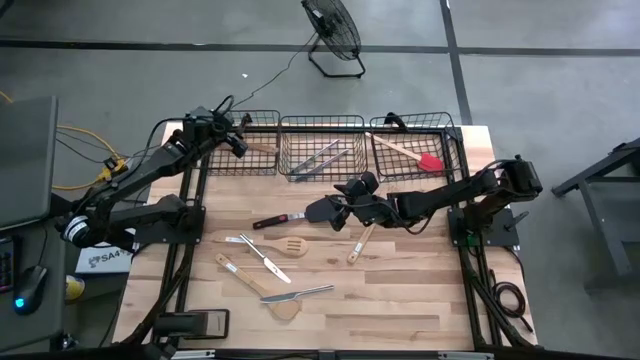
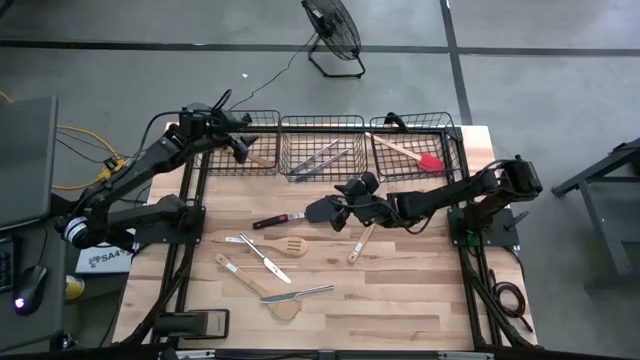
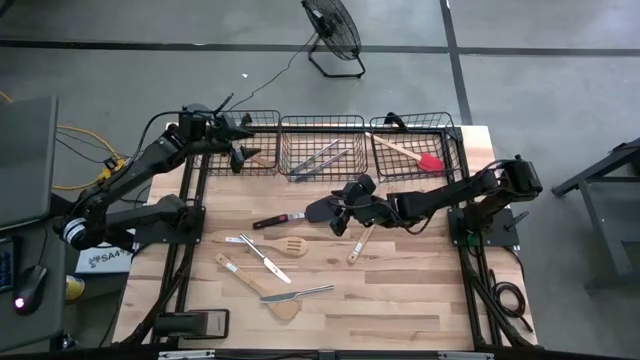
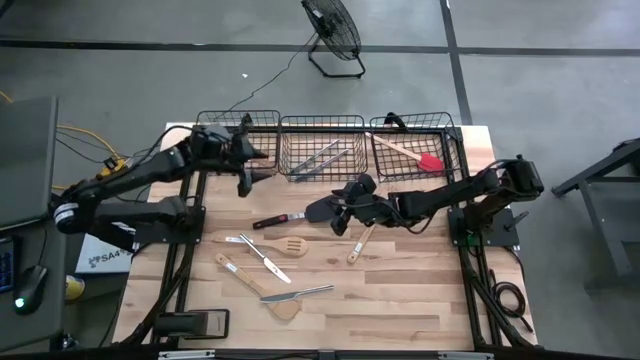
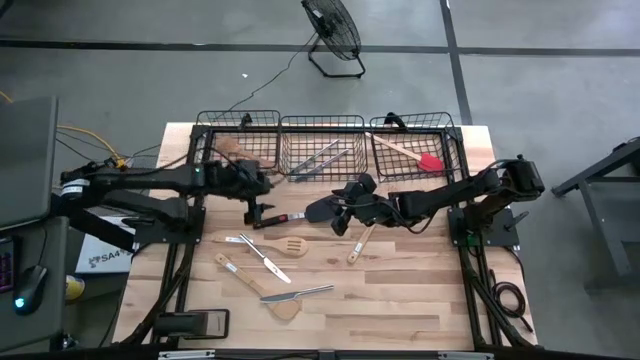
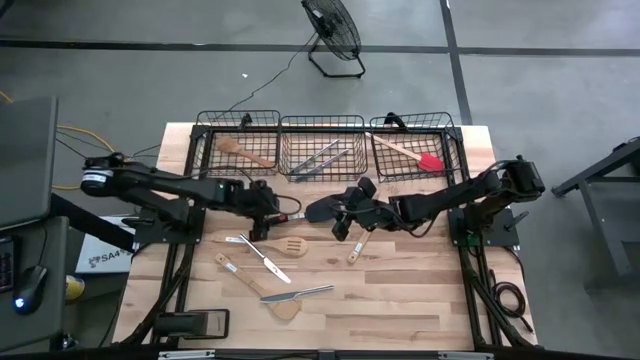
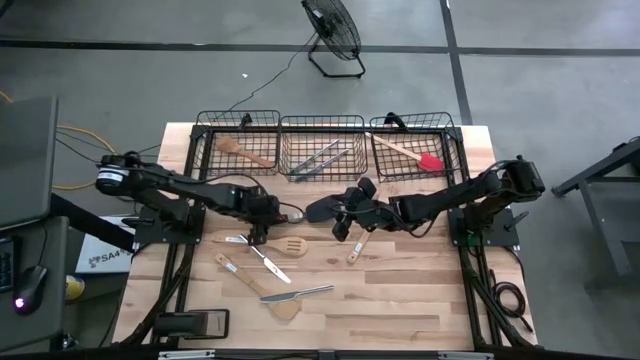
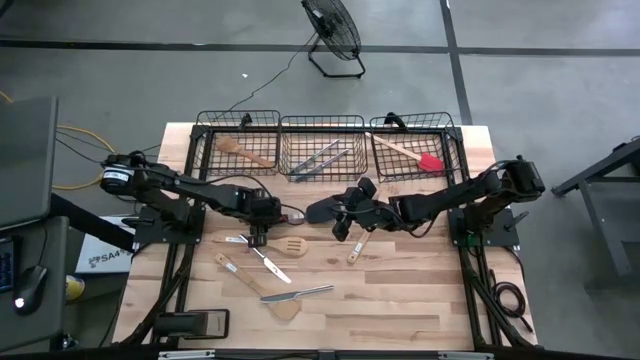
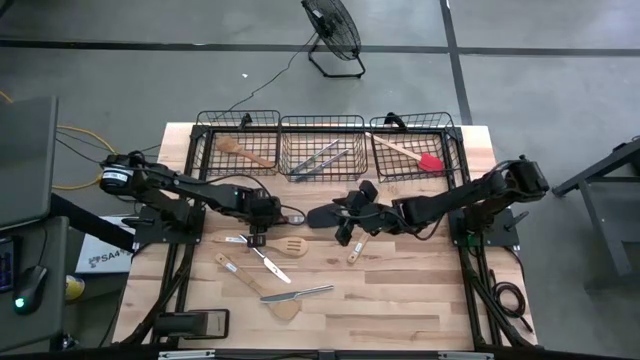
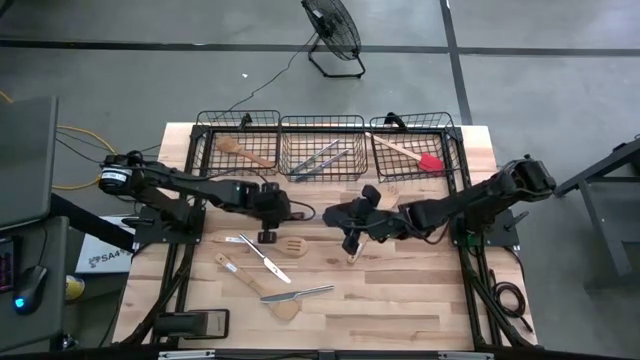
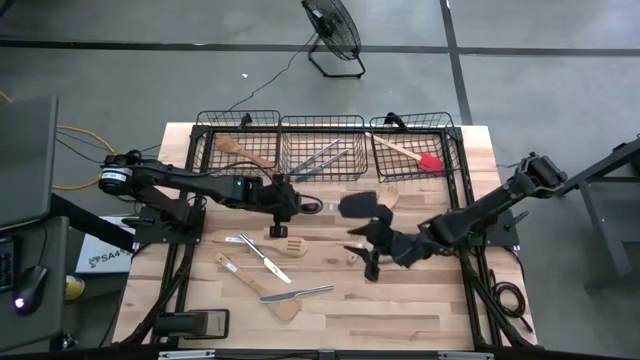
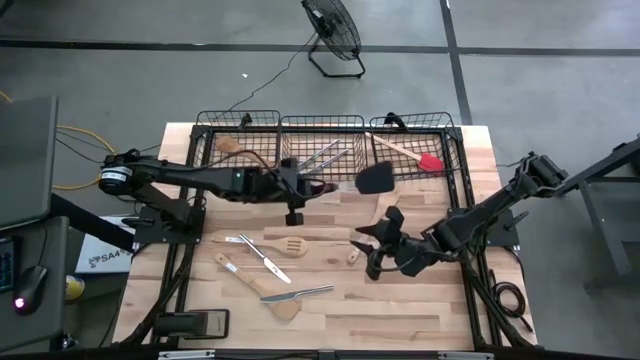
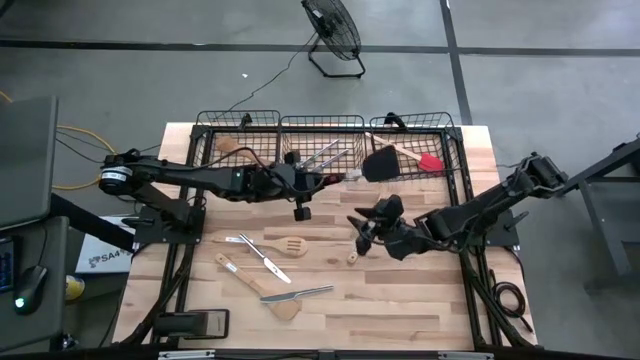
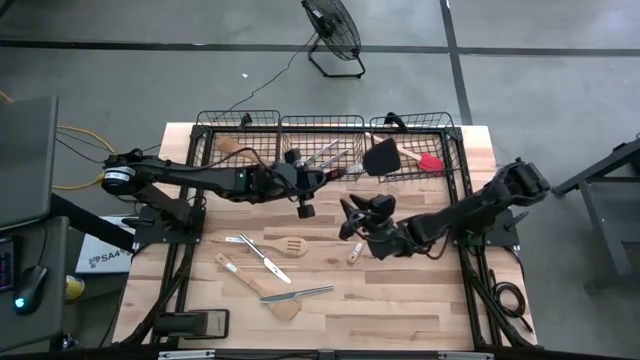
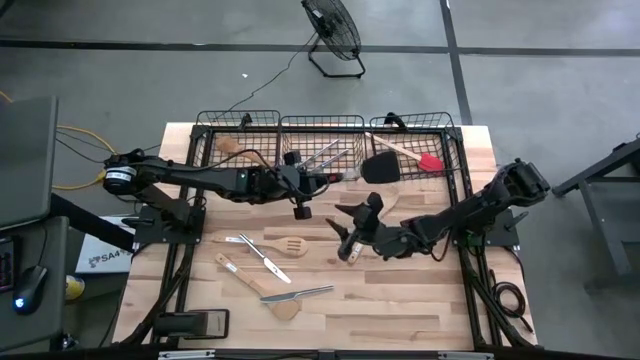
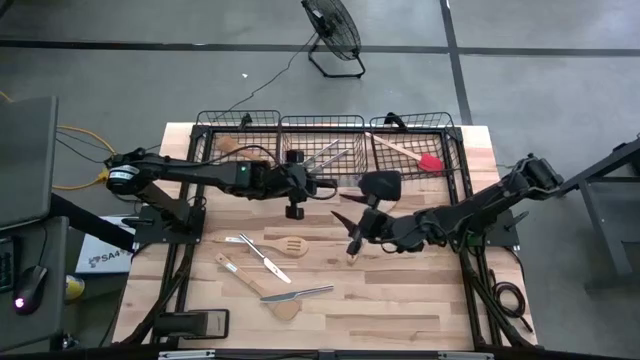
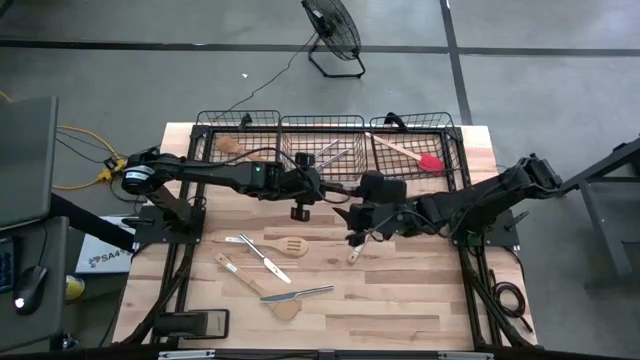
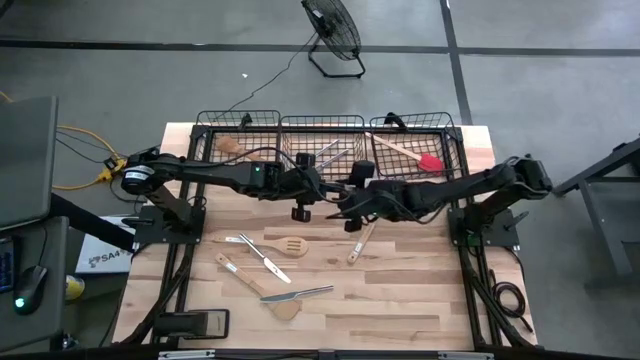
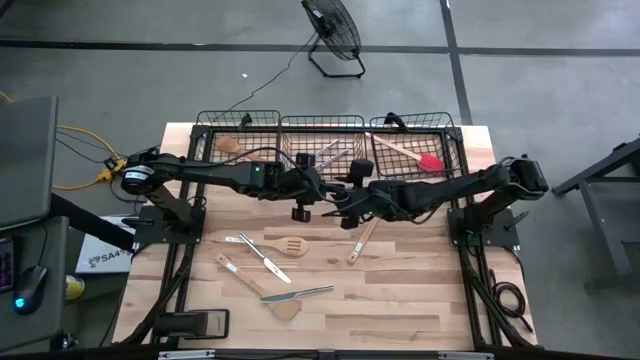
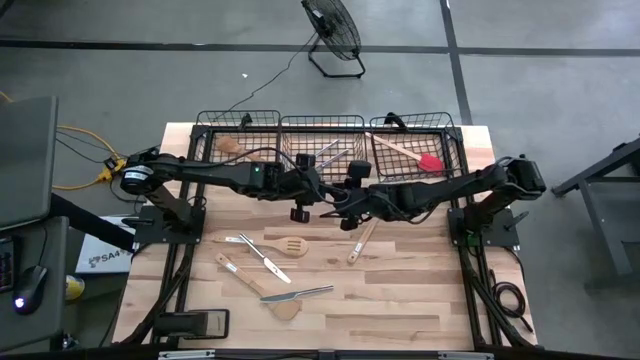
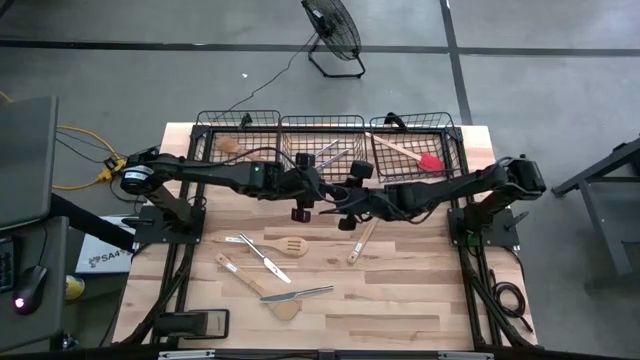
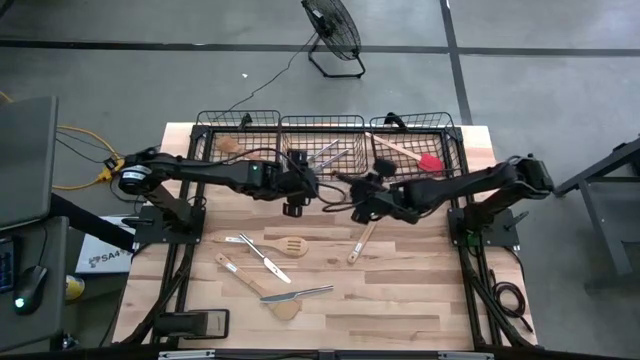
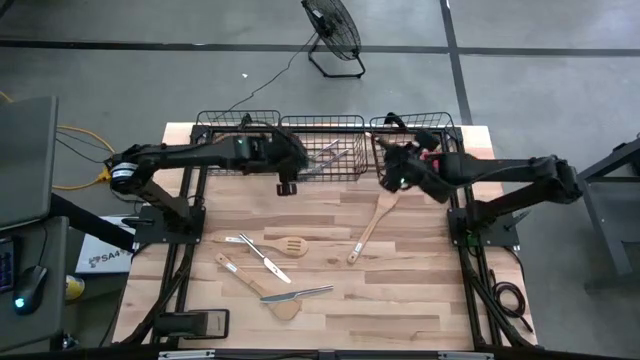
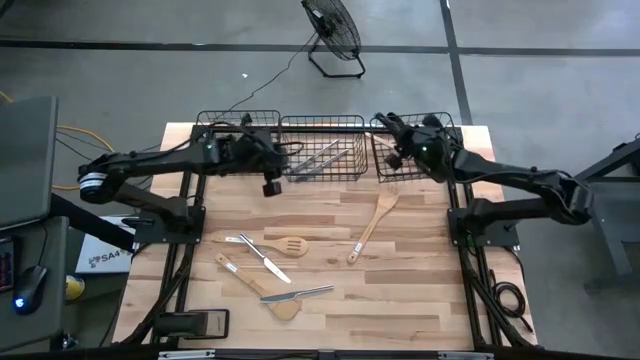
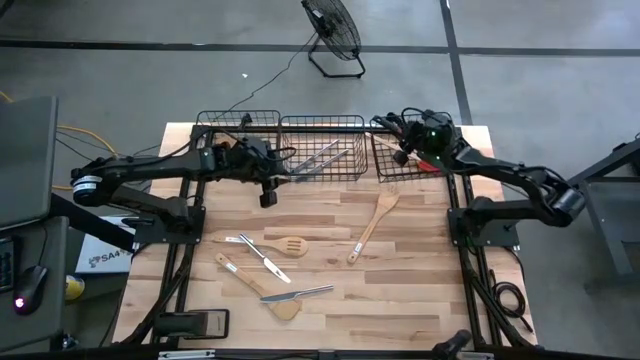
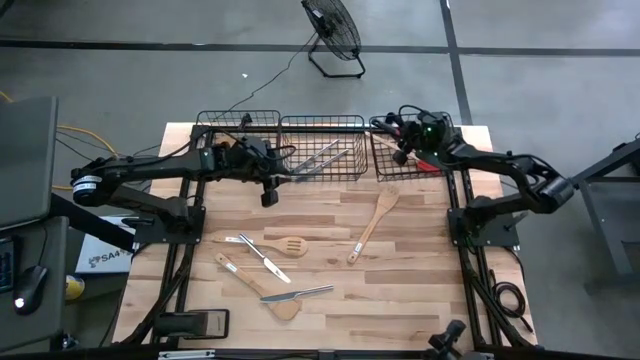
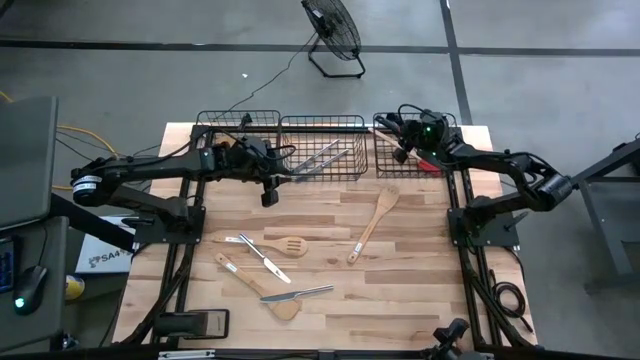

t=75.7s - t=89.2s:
Task: Pick & Place Kitchen Items
Put the black spatula into the right mesh basket

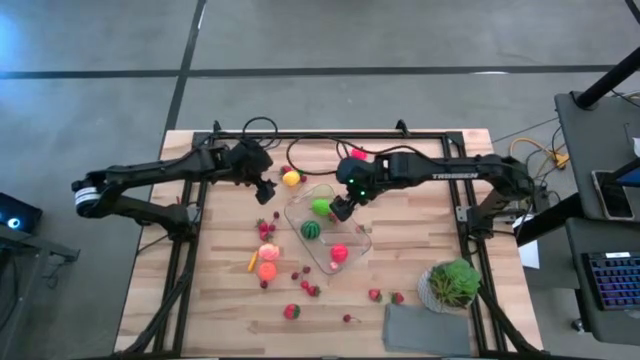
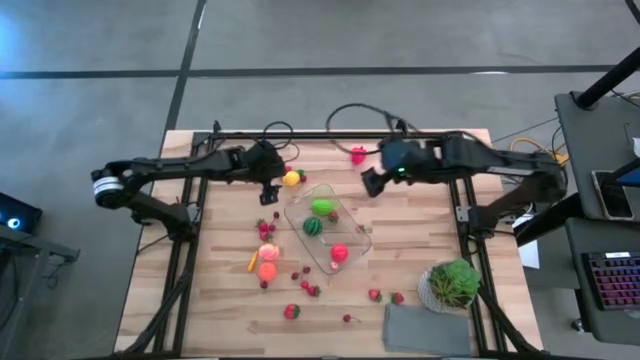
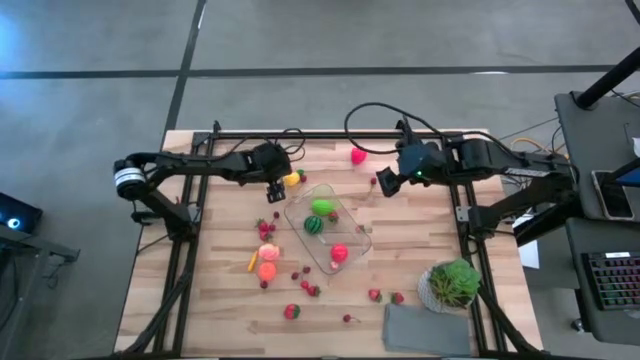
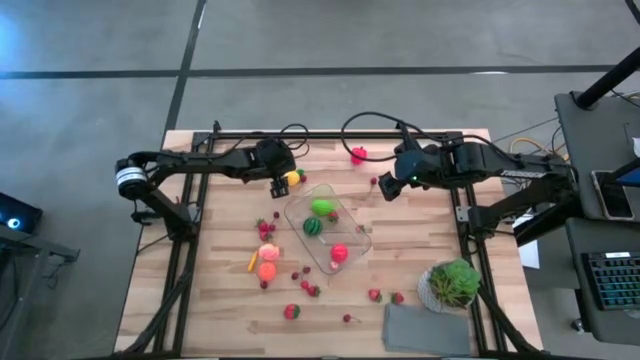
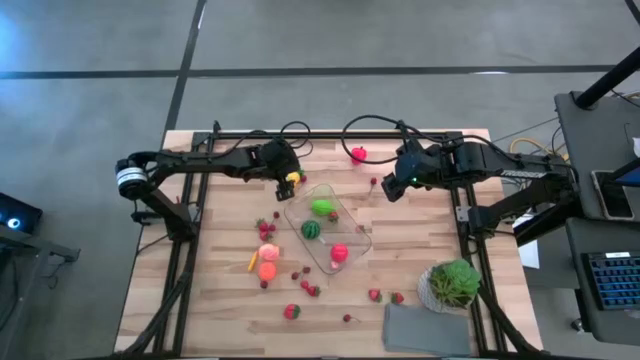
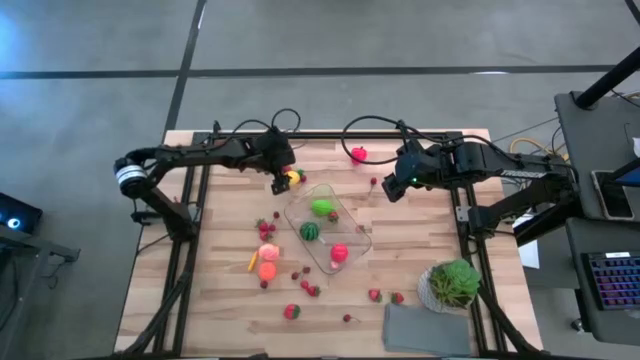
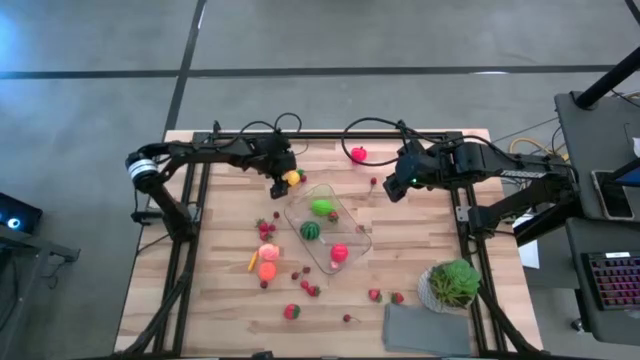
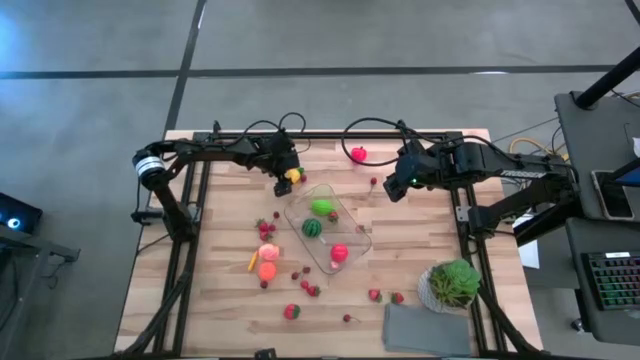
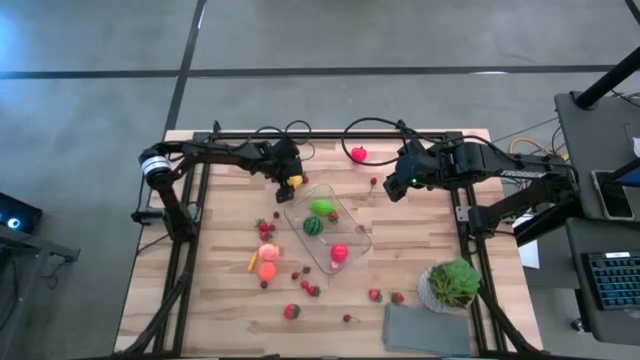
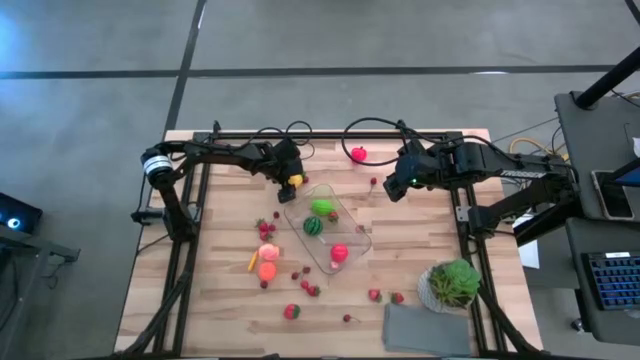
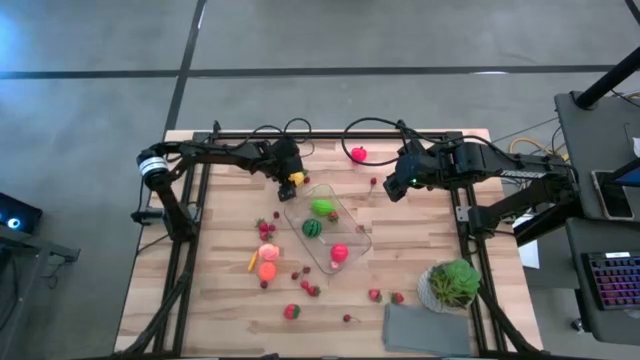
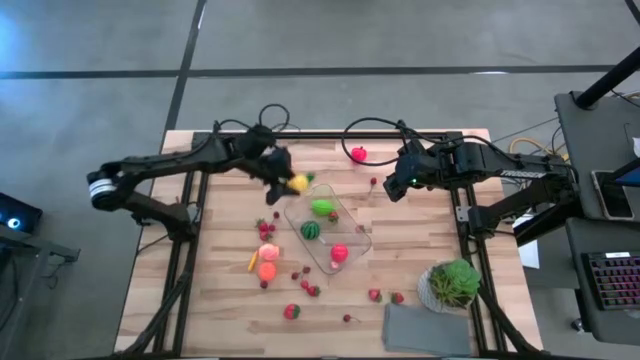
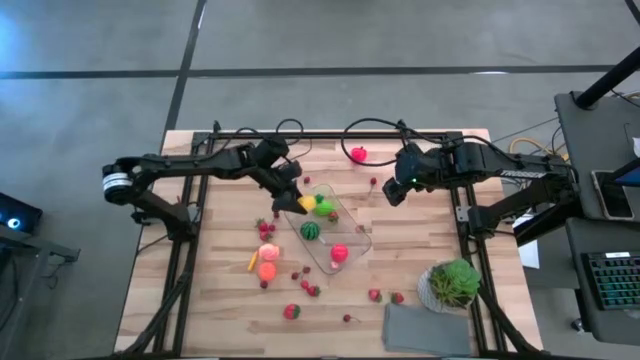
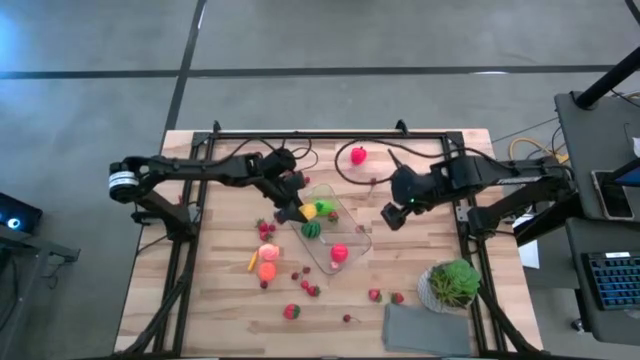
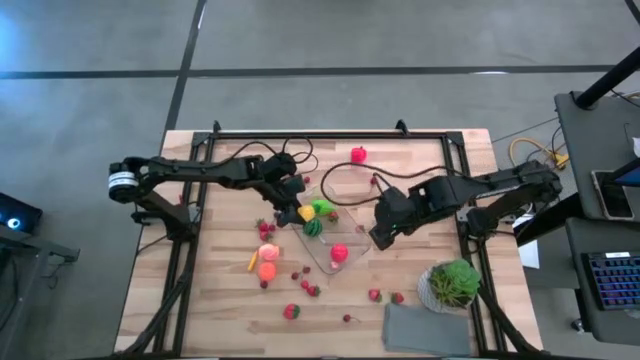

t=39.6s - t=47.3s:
Task: Pick and placing Produce into tupperware
Put the yellow pineapple into the transparent bin
